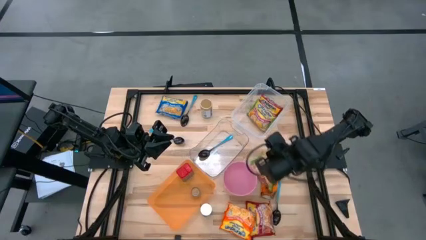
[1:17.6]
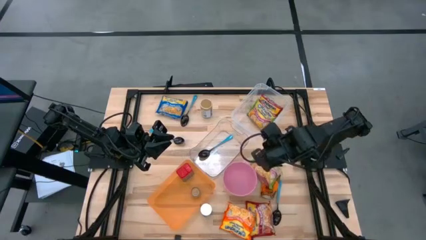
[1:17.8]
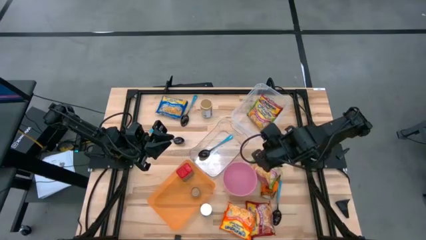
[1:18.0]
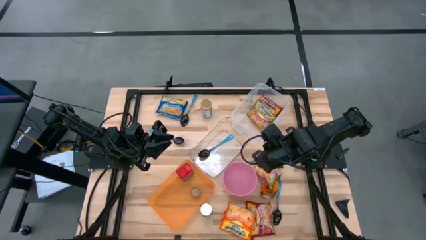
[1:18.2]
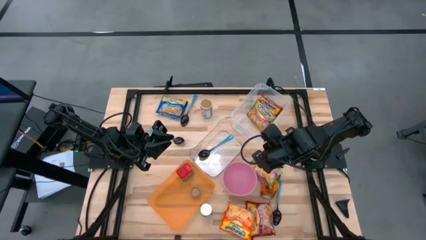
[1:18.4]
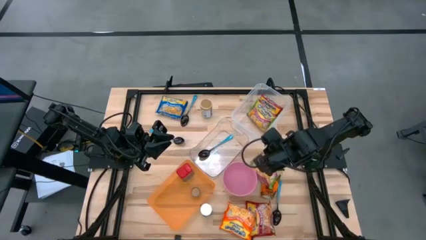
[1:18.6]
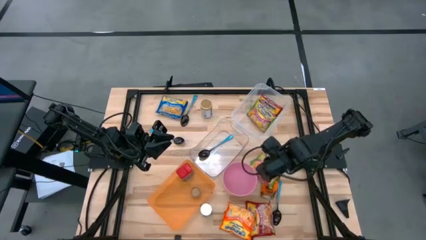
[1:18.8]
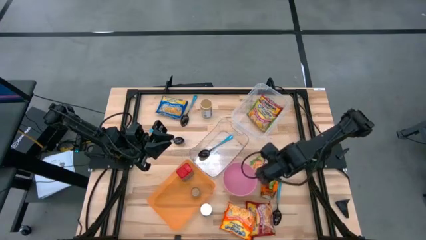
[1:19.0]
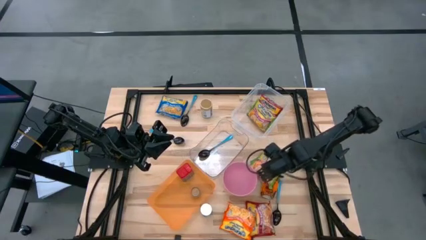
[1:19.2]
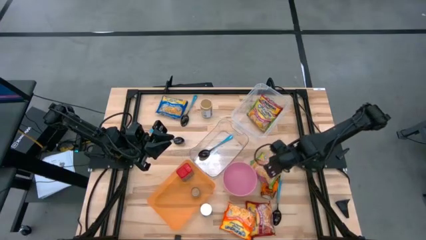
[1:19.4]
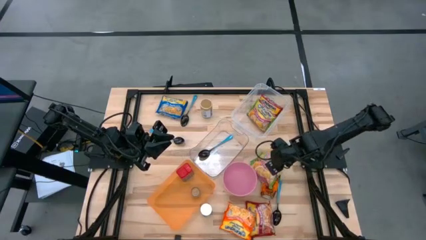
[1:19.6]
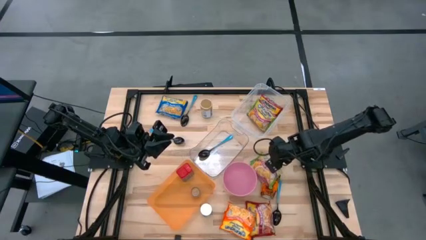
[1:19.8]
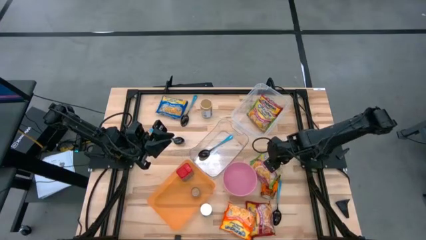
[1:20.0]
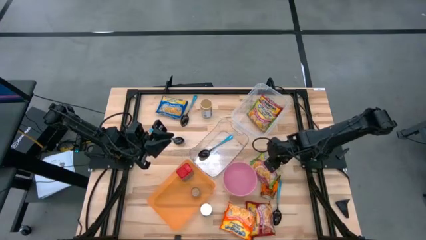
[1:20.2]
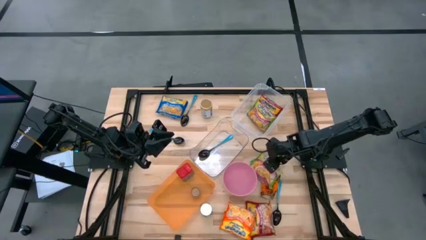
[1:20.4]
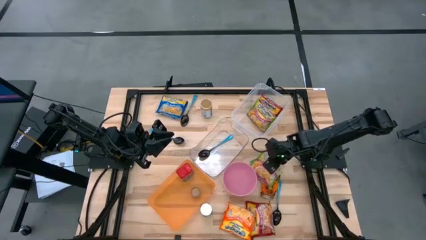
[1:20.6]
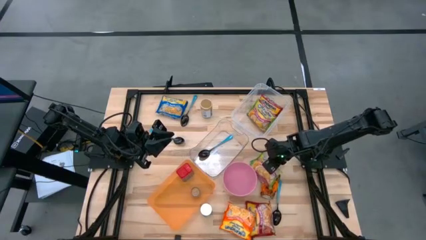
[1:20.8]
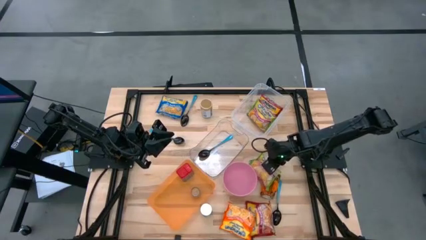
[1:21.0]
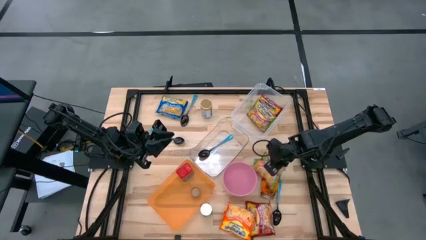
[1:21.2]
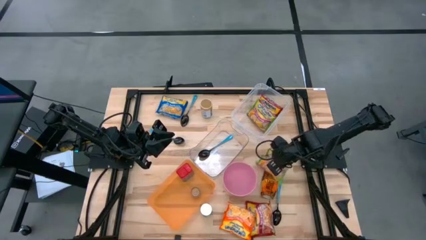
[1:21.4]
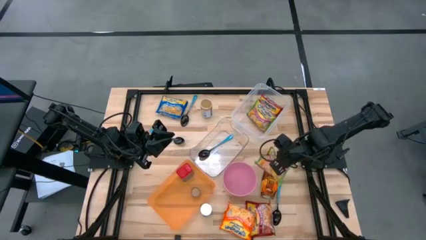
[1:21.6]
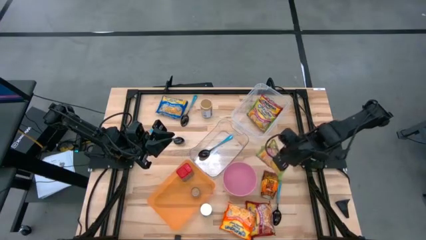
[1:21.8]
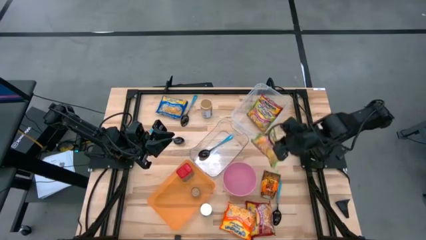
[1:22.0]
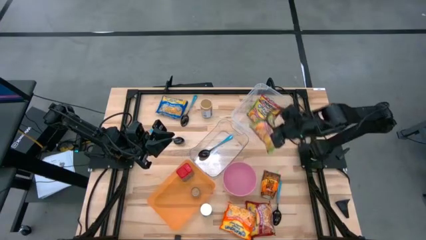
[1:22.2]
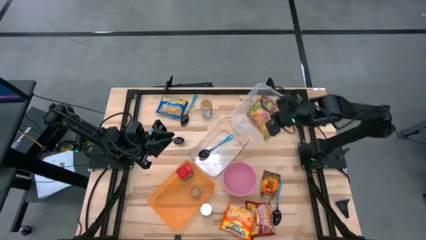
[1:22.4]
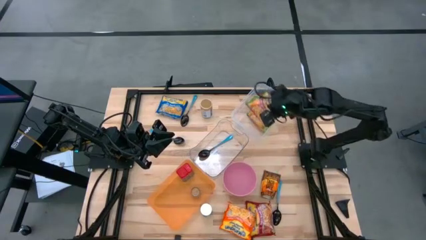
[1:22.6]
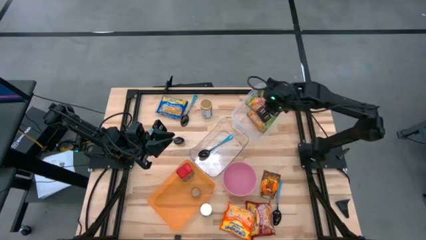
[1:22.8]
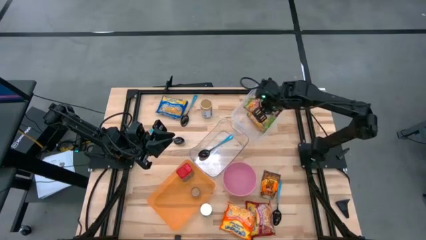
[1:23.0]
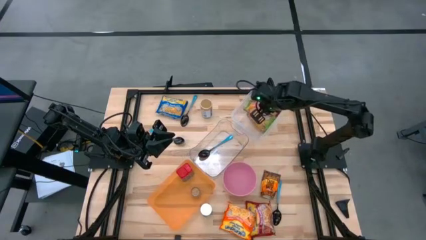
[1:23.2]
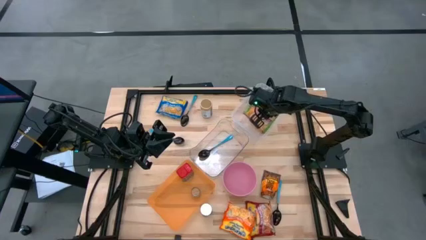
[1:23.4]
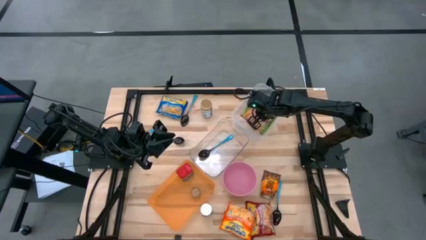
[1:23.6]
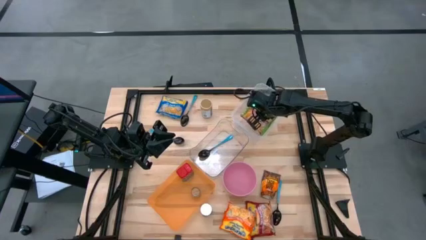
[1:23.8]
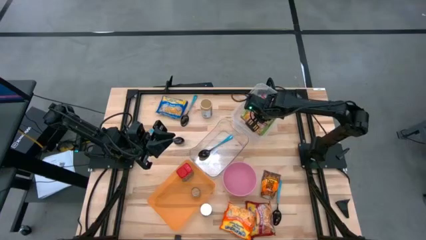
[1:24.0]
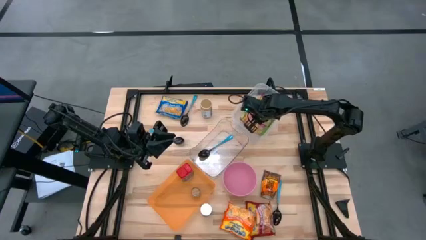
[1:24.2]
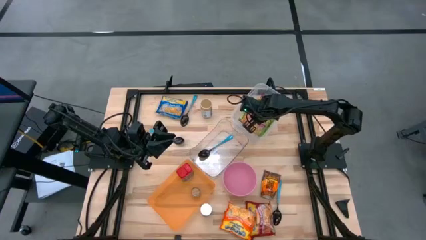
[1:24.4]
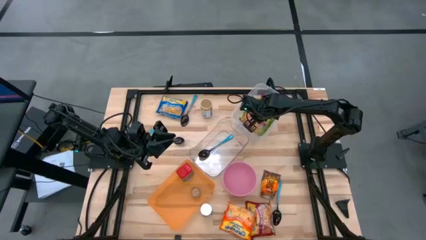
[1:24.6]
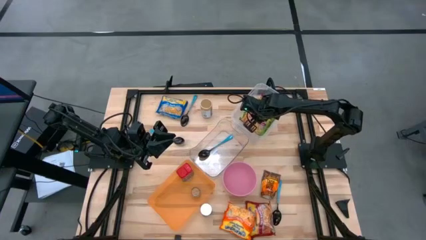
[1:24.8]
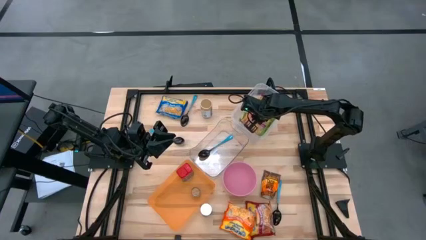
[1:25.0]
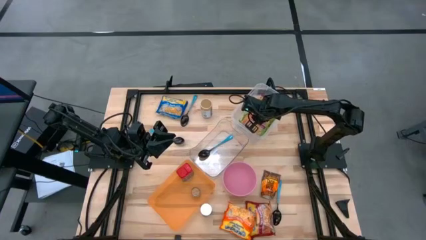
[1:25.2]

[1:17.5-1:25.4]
Task: Pick & Place Food Item
Put the green noodle pack into the transparent container

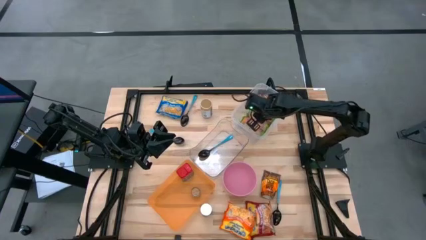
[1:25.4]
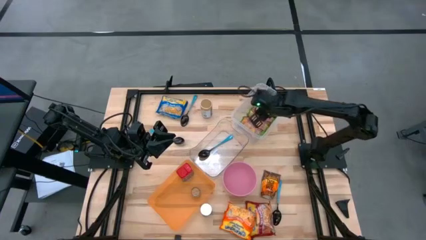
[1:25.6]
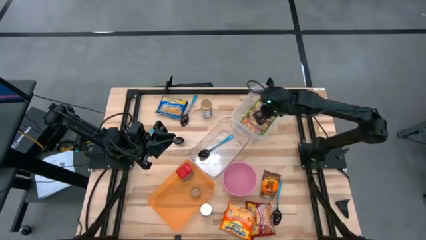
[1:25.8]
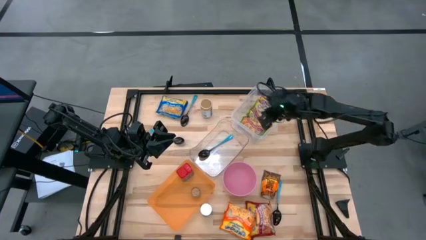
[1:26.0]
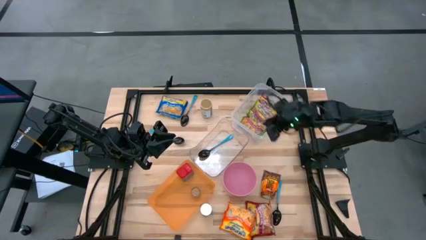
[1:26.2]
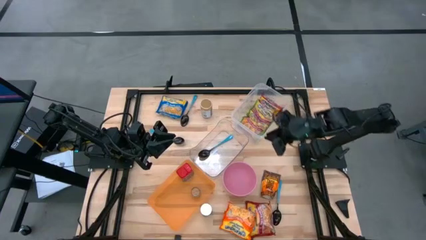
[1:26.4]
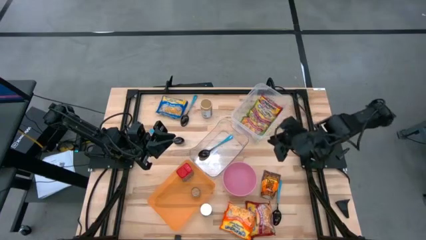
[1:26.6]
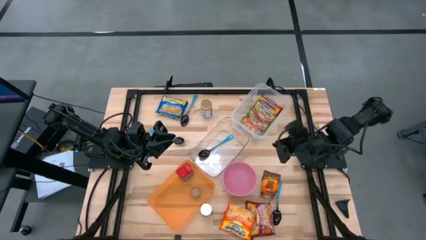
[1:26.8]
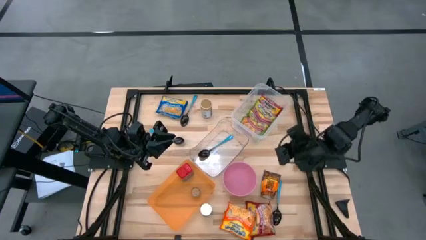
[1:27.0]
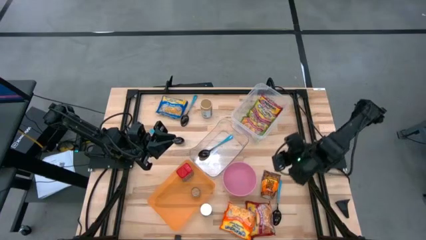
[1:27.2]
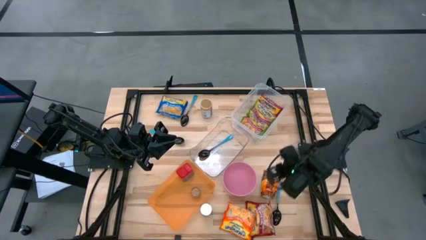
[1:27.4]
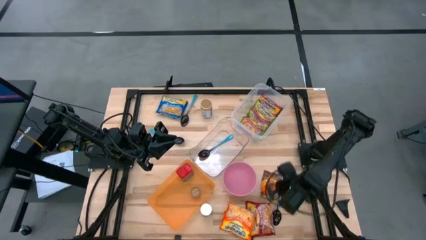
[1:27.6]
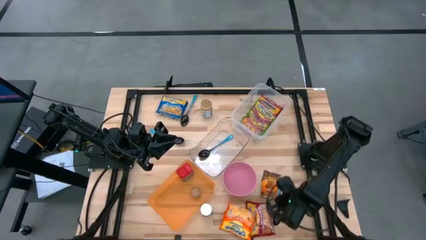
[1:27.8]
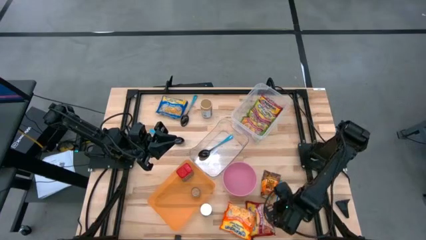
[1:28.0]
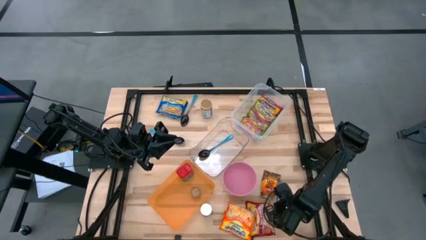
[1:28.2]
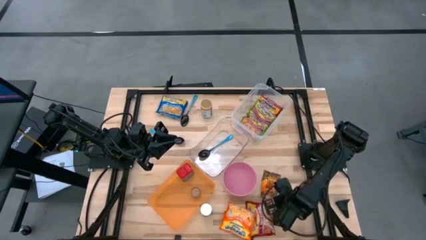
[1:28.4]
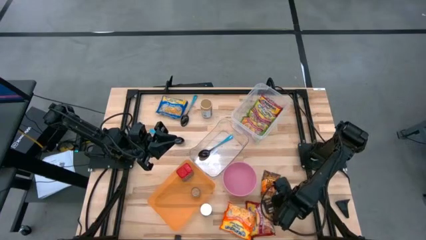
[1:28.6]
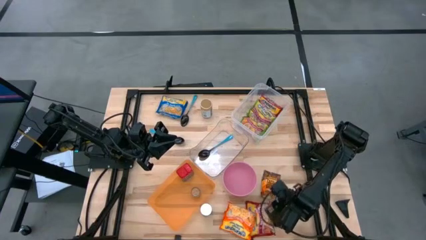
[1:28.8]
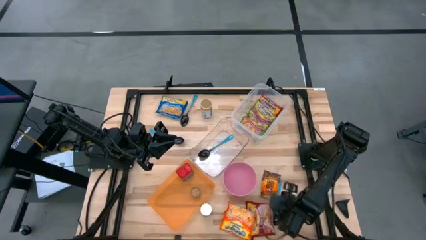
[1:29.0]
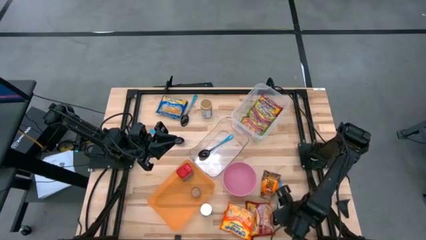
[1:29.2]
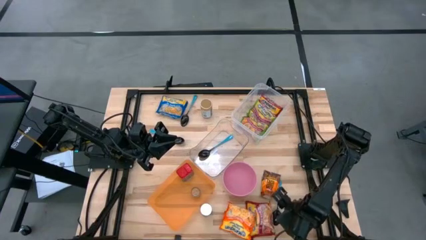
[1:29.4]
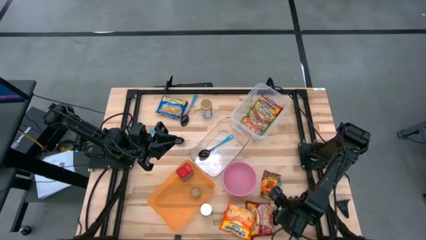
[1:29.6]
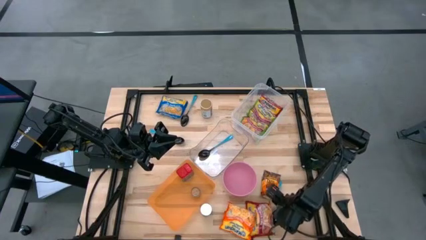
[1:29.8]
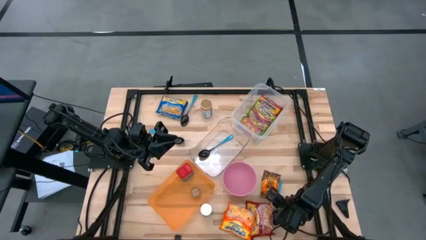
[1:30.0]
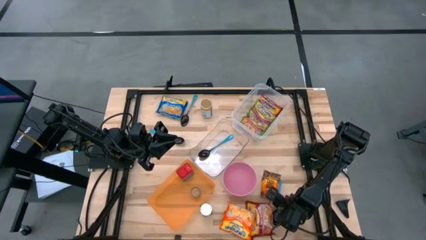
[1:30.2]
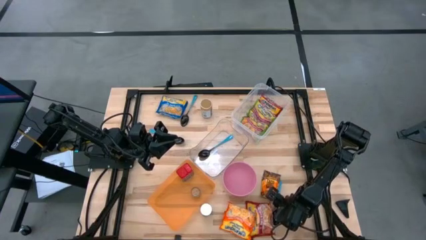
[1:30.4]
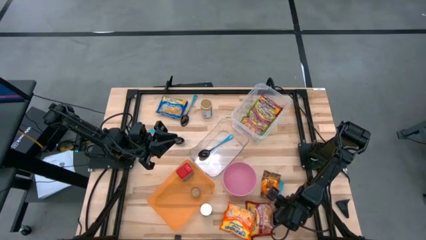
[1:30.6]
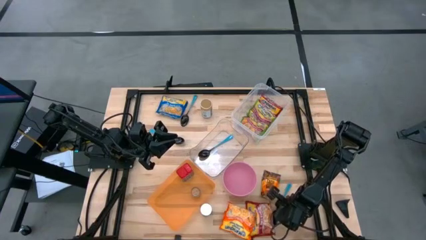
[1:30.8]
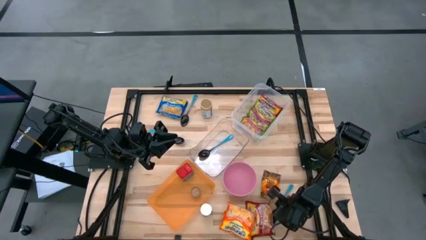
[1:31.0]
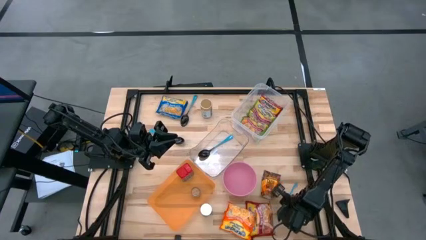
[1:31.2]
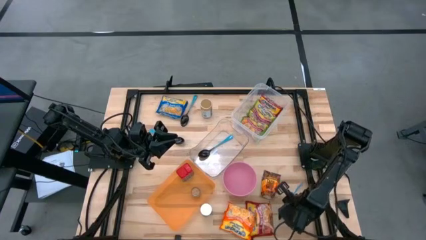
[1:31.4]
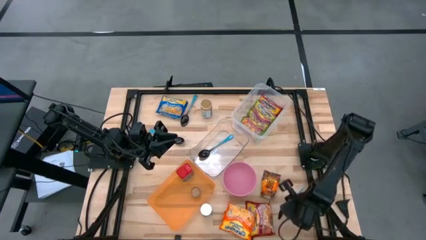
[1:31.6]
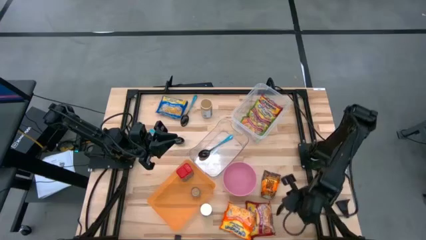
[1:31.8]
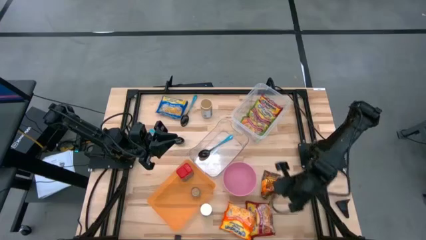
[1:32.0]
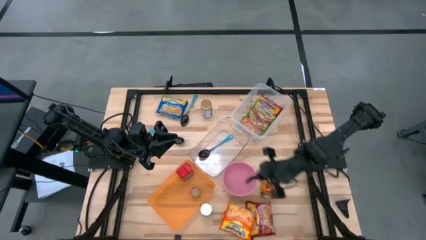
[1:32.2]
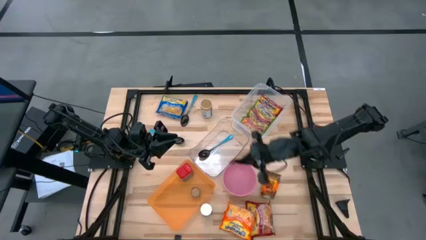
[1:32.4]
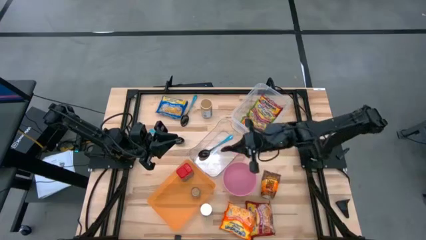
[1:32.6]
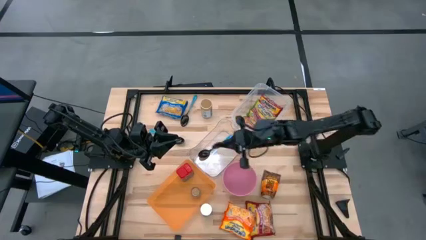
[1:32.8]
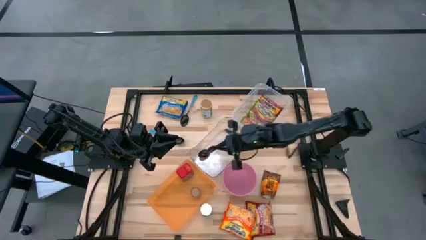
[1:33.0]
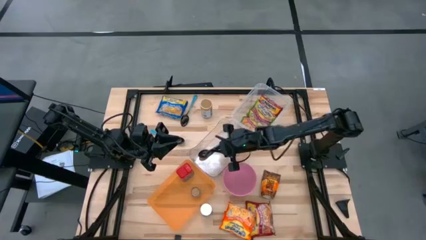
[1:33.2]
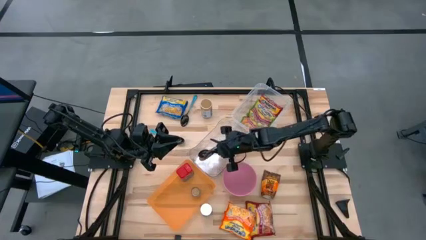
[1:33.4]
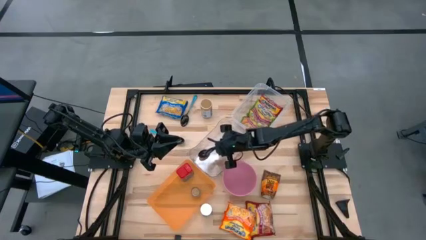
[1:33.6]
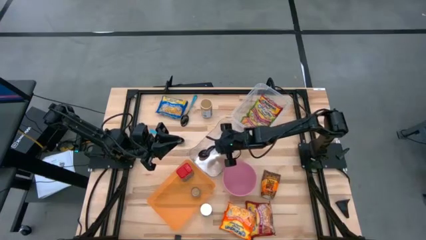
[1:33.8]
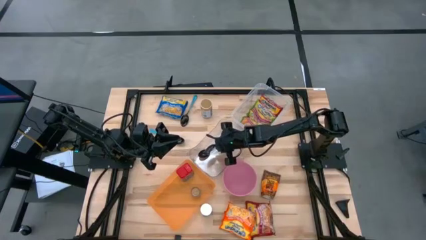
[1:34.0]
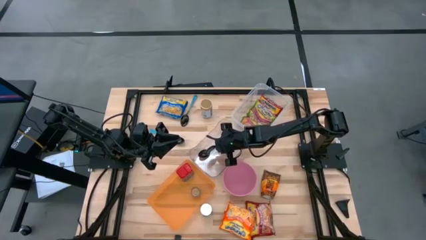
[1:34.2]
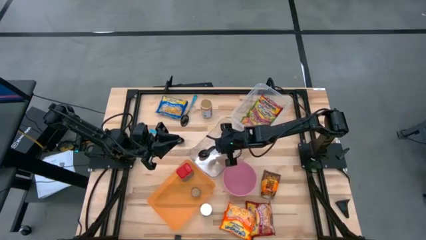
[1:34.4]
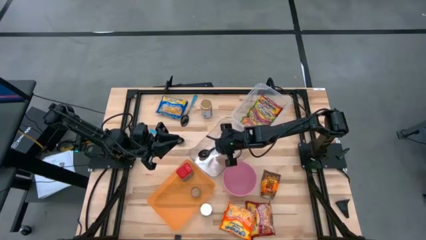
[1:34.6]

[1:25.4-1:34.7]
Put the blue spoon into the transparent bin
